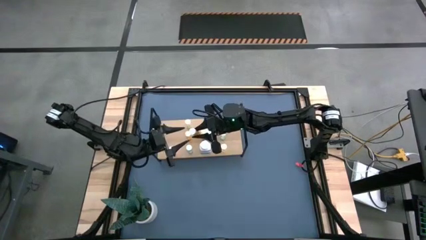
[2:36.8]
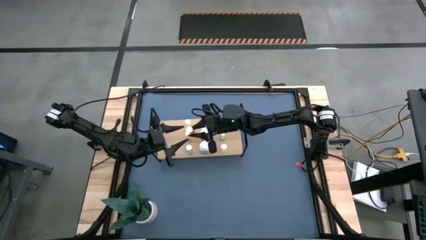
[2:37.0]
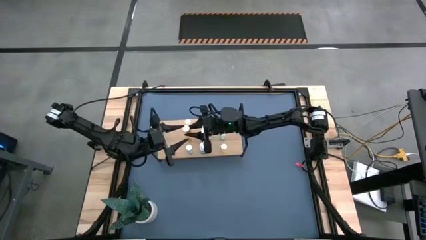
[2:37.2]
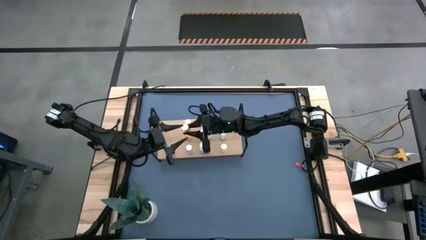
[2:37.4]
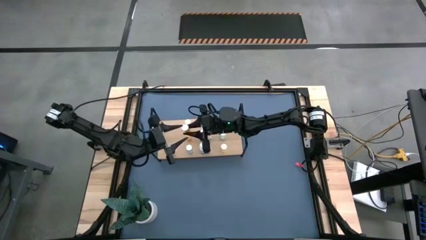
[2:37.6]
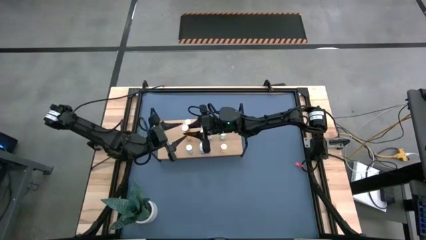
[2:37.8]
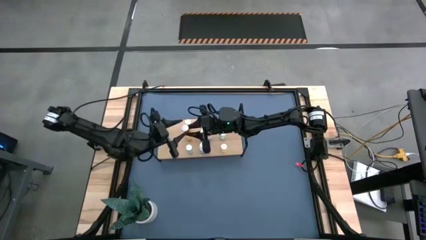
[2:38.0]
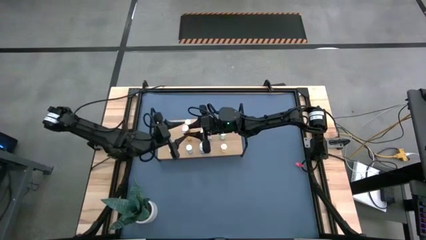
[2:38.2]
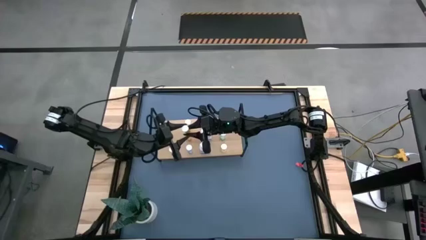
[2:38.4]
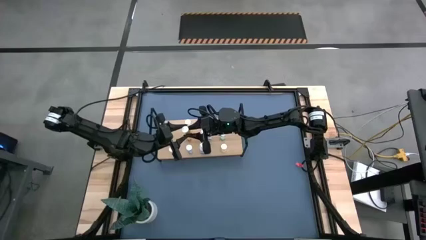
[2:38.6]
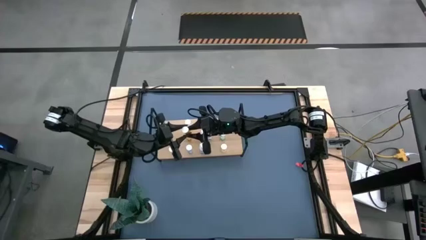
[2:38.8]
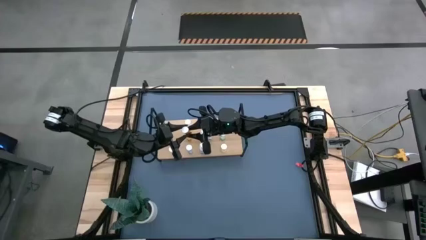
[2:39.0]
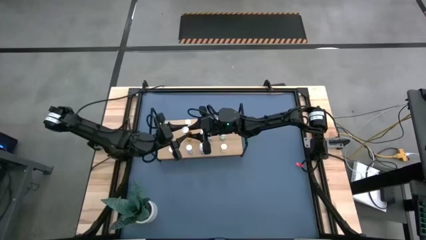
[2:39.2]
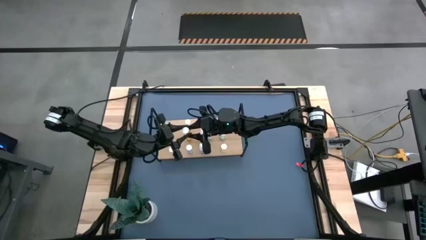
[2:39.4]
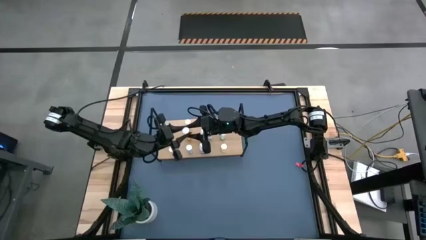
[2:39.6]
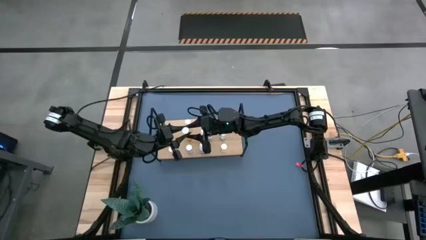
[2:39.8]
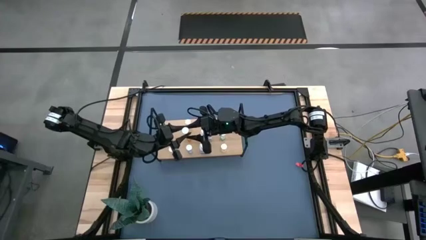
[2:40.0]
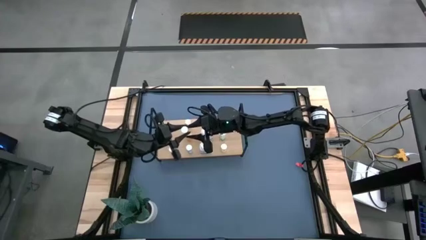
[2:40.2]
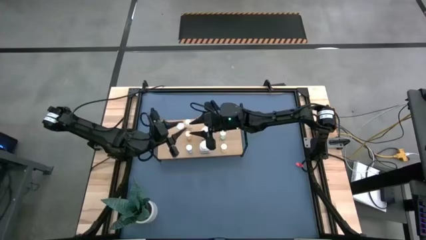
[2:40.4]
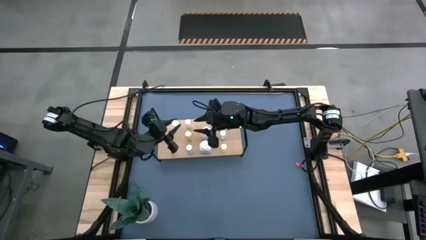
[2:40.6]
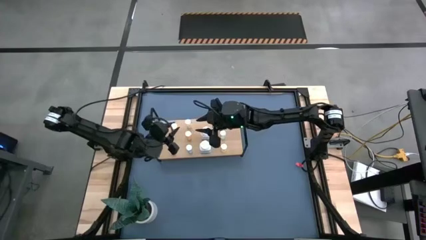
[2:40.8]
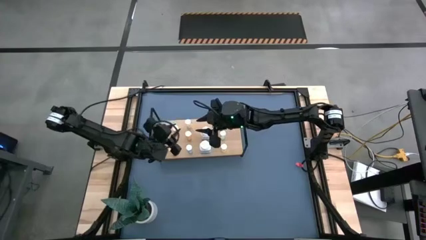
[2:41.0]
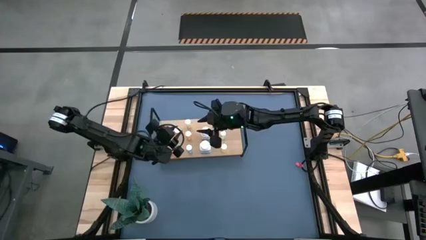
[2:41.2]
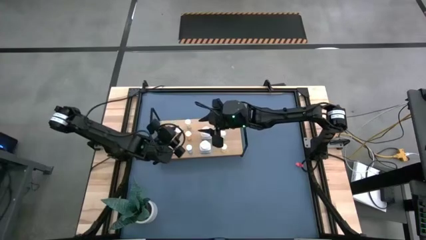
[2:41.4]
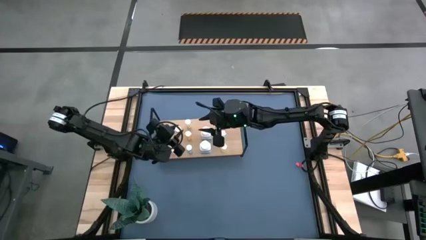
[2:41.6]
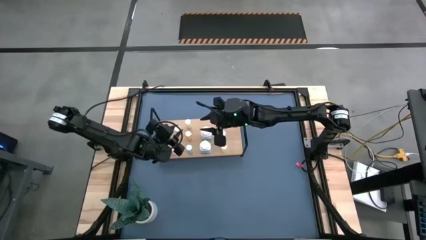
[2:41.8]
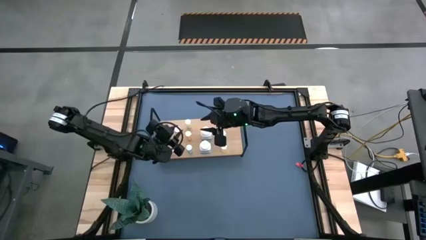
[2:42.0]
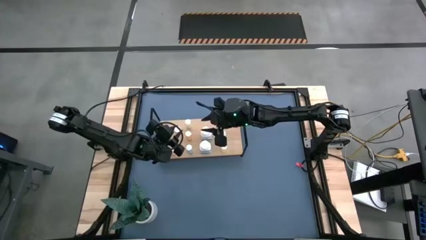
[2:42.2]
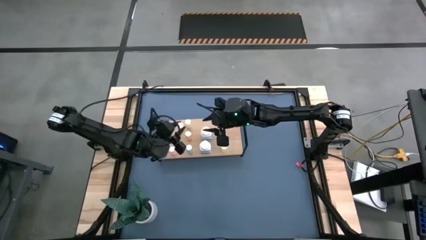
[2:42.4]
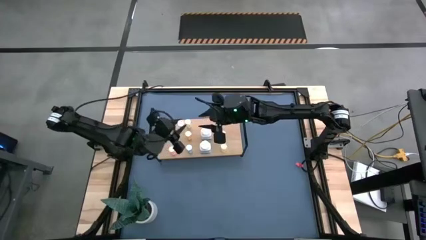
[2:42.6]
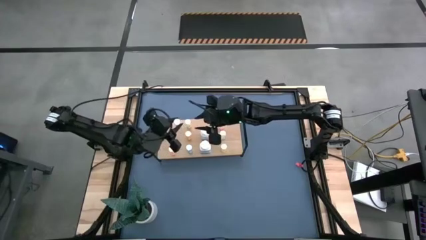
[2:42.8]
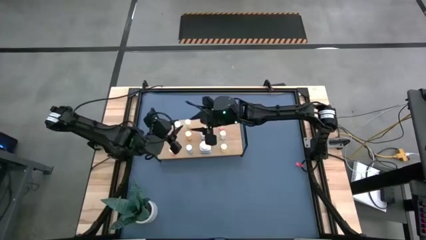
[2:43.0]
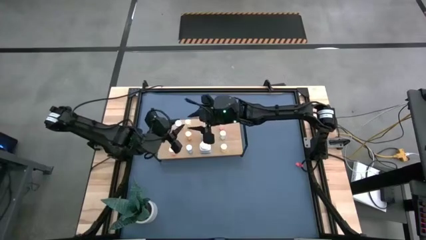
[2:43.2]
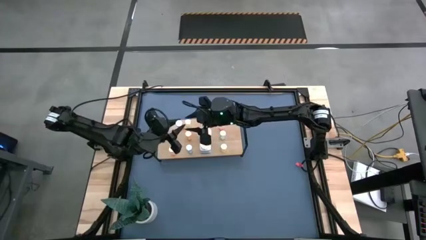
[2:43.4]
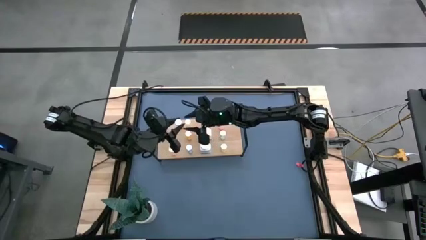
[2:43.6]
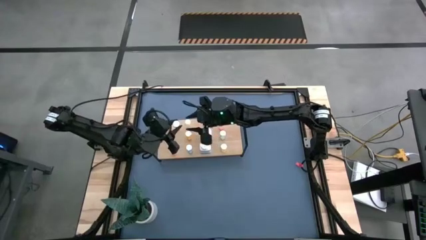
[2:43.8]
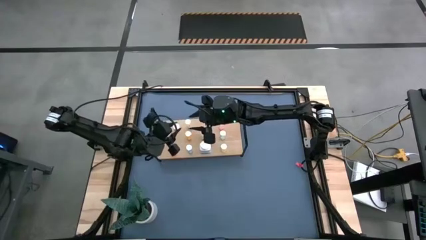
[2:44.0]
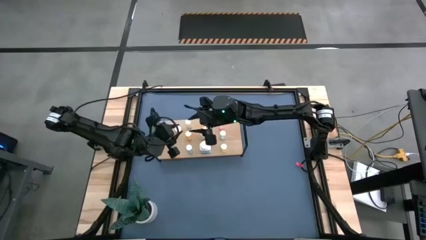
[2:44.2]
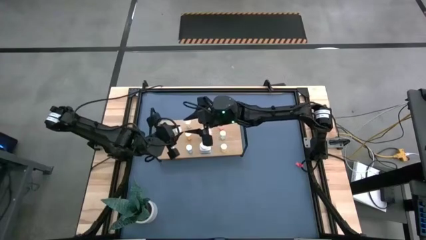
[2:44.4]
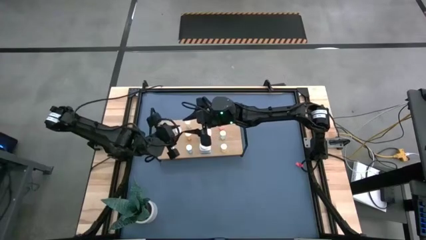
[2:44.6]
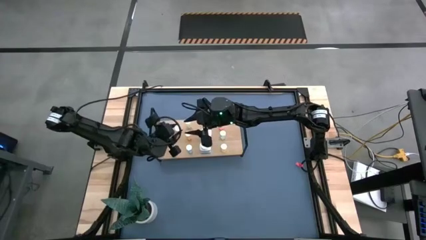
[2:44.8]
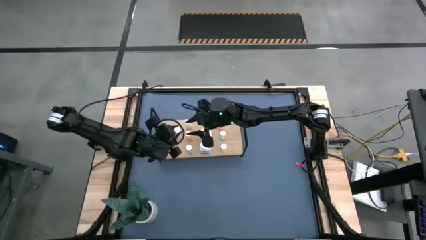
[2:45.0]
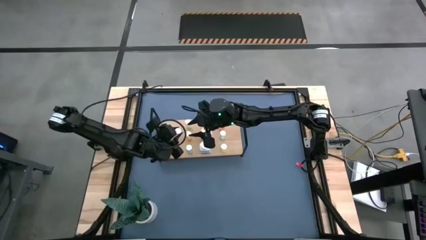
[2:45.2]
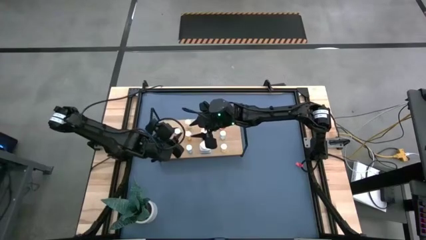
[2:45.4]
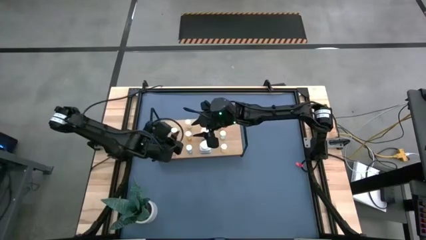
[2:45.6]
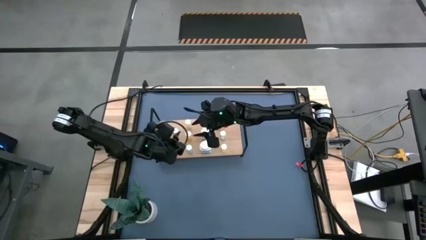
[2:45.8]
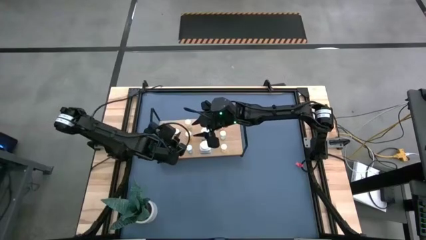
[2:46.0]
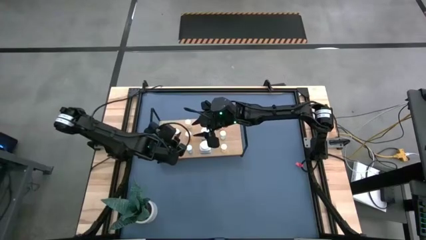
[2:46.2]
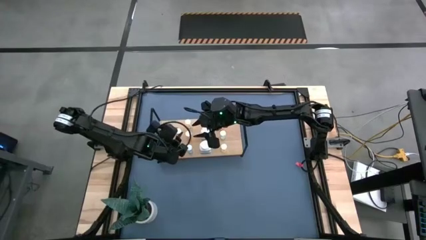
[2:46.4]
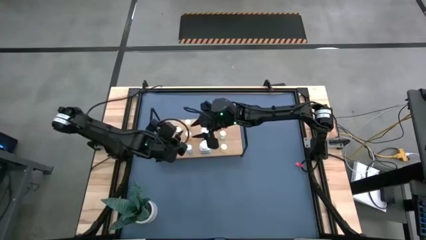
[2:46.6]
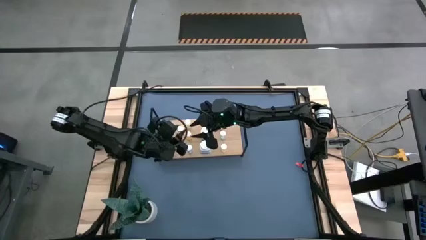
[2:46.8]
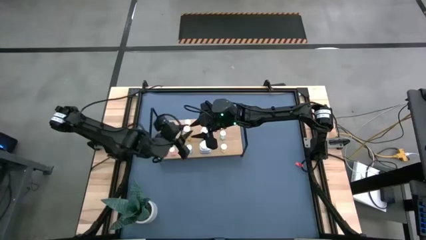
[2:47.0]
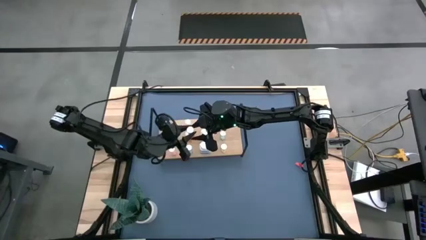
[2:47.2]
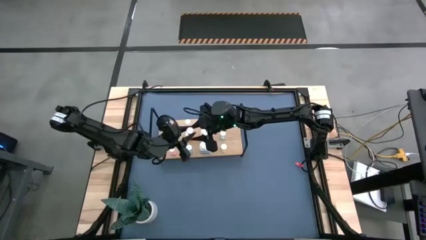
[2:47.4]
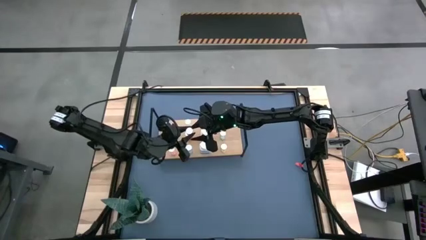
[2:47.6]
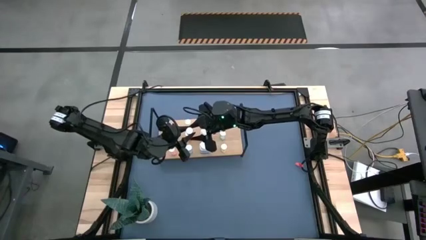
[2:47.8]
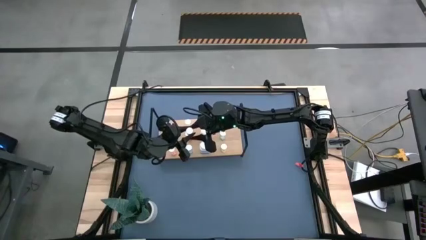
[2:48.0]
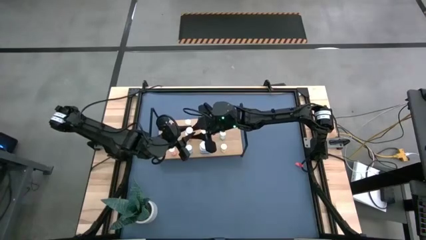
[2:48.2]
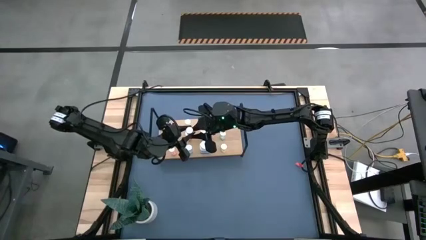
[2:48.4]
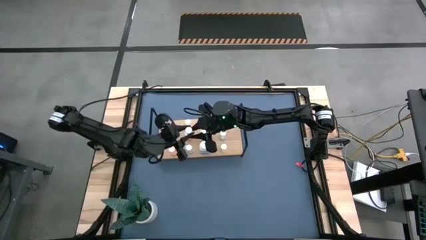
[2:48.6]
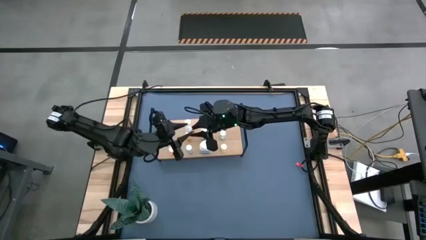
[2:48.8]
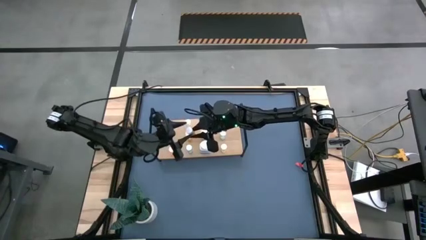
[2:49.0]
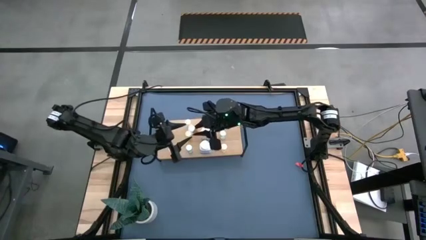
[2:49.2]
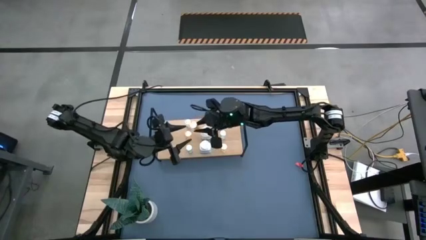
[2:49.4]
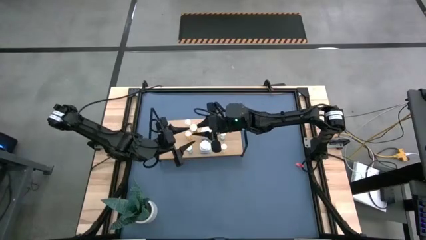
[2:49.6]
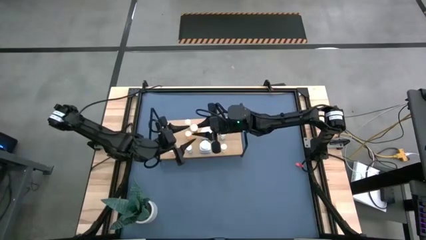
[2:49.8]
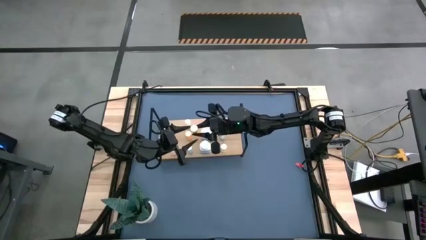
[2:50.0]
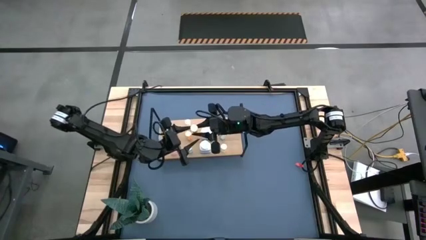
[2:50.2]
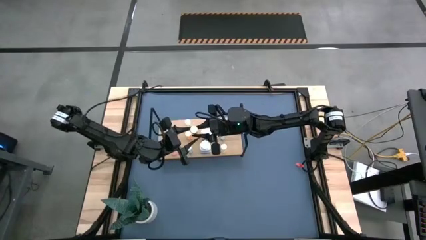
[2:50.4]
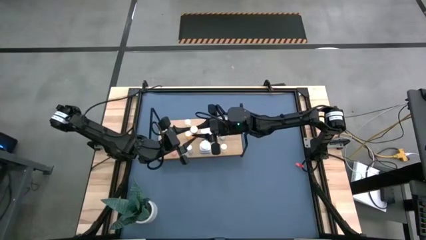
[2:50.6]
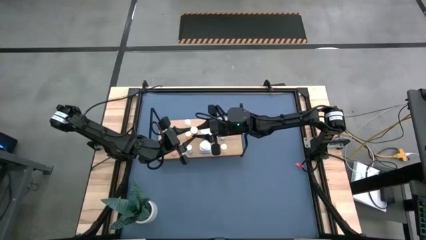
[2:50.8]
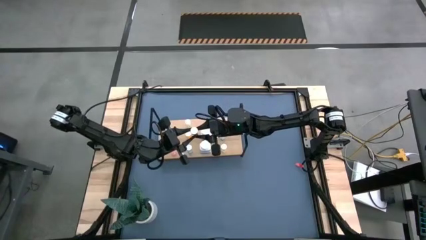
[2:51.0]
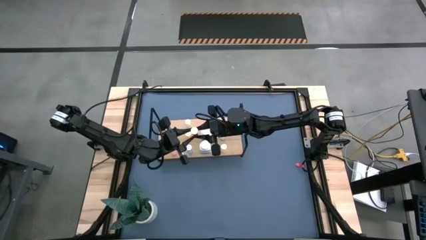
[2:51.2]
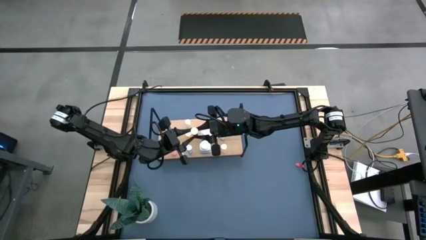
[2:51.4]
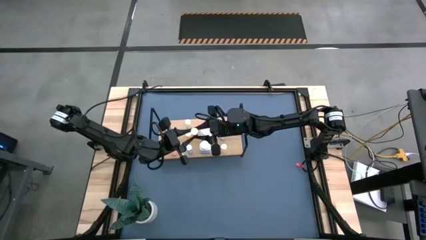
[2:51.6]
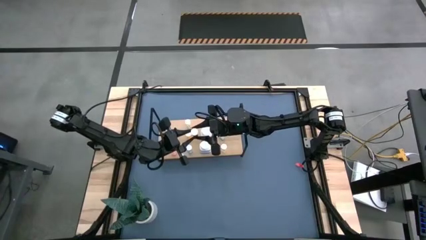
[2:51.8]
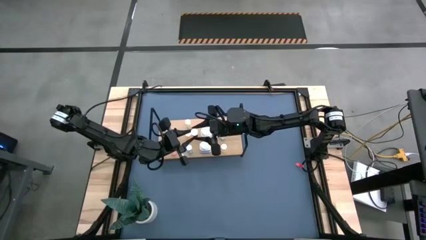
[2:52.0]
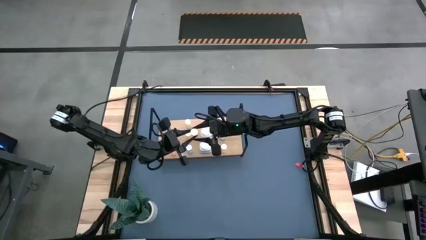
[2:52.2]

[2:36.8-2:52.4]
Task: Pick and place medicine bottles onto shelf by color
Put the orange pill bottle on the shelf

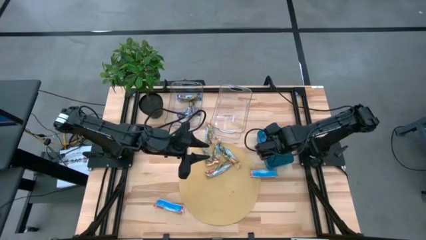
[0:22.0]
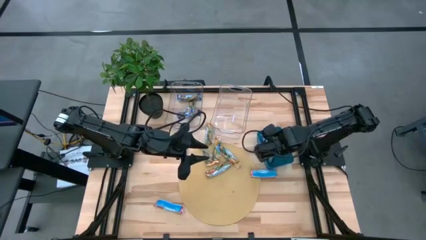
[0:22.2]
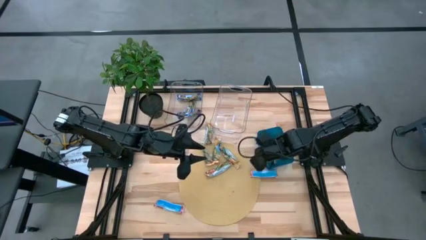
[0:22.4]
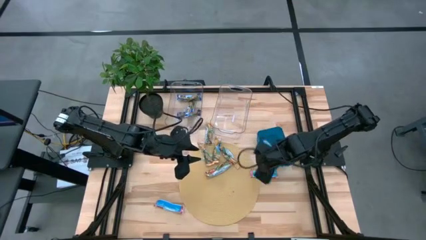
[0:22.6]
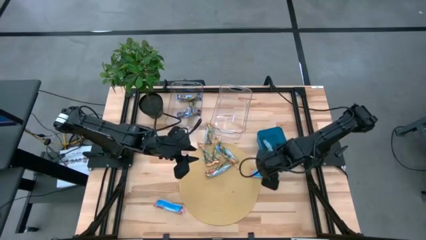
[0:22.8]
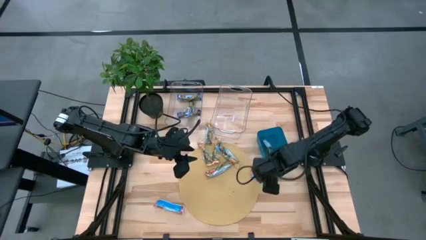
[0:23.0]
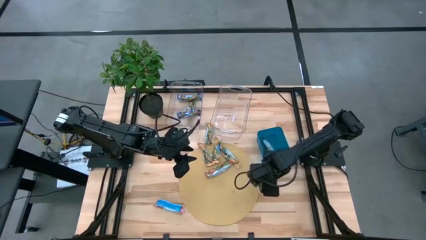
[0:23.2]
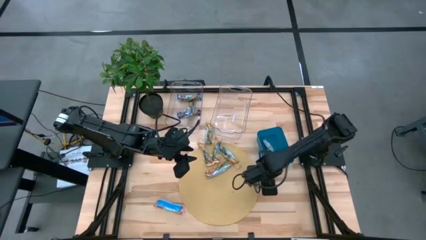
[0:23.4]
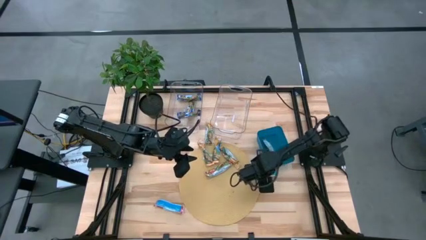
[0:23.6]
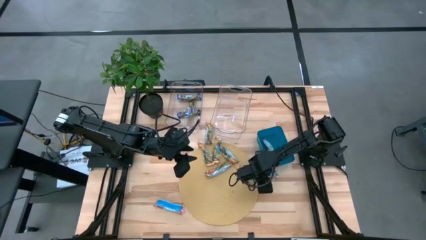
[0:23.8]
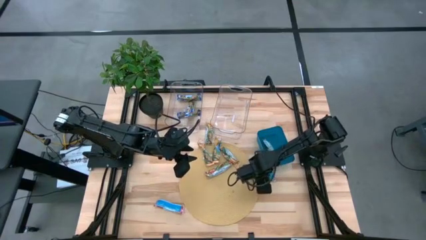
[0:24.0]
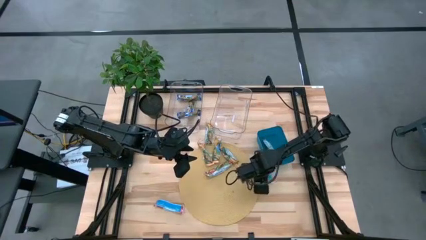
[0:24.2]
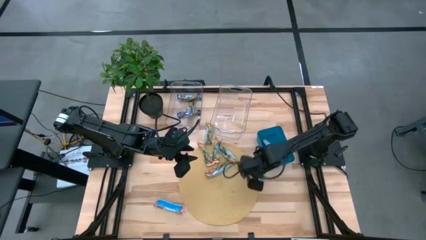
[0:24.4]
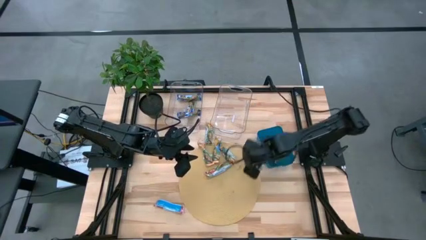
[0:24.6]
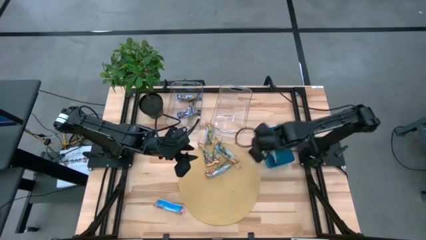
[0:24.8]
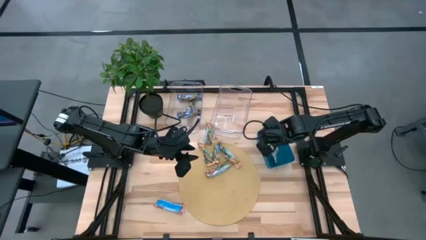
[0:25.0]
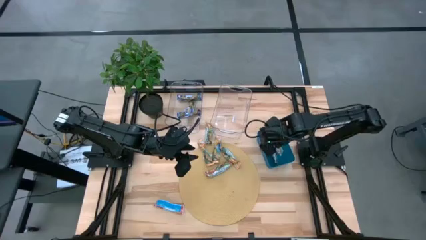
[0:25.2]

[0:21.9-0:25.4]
Task: Pick and place Granola Bars by type
Put the red granola bar into the blue transparent bin
